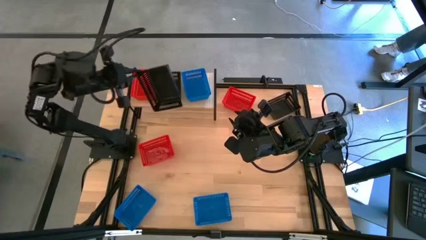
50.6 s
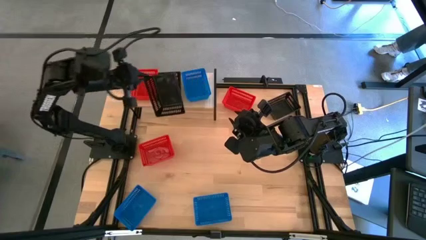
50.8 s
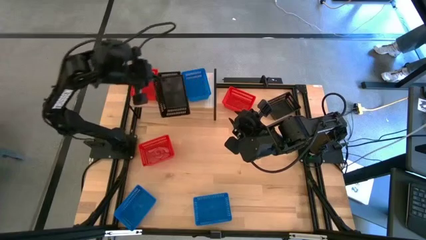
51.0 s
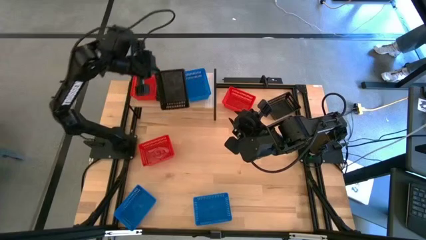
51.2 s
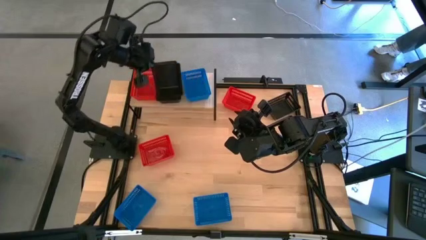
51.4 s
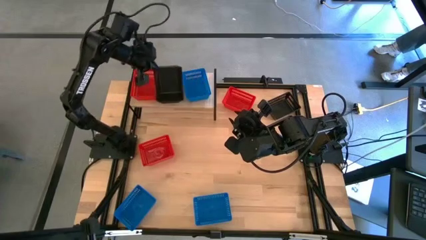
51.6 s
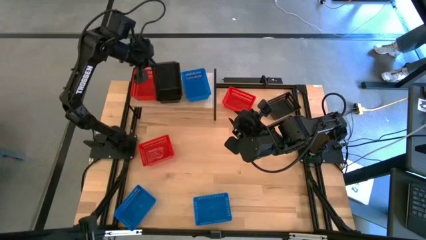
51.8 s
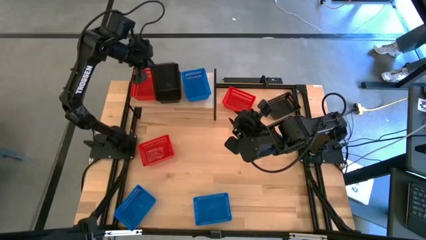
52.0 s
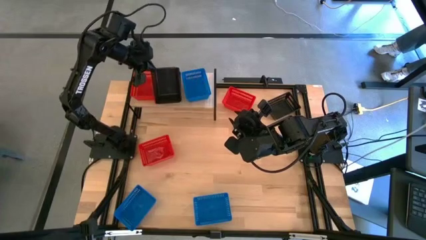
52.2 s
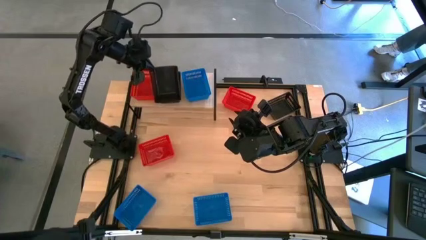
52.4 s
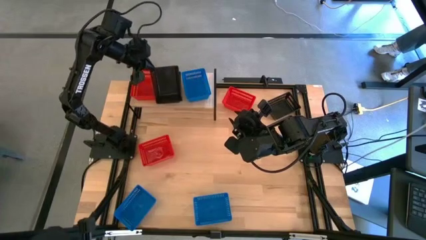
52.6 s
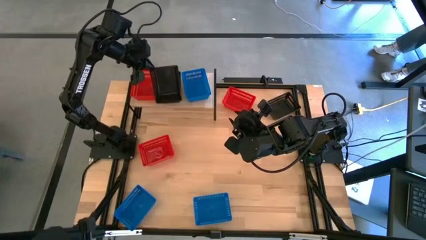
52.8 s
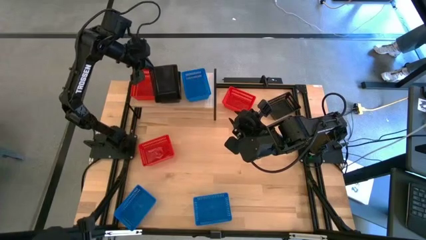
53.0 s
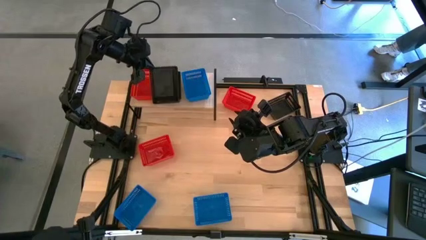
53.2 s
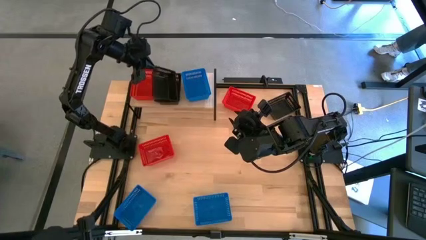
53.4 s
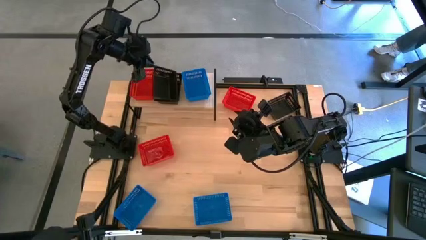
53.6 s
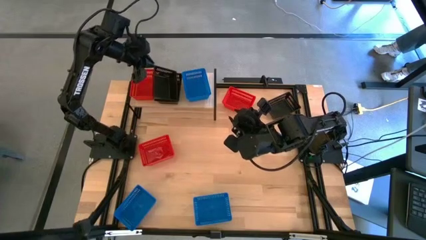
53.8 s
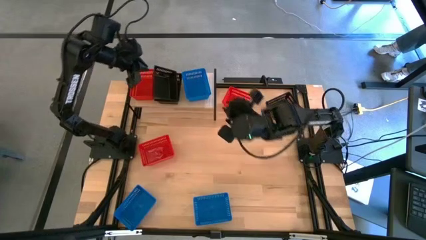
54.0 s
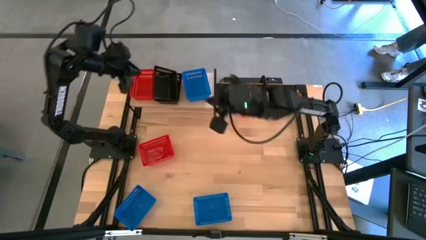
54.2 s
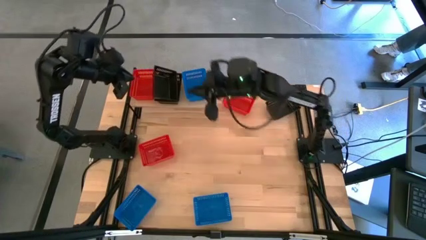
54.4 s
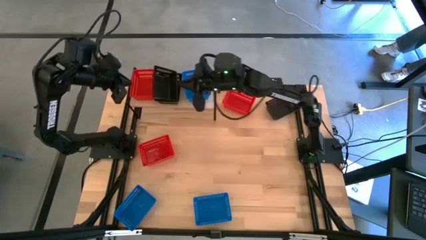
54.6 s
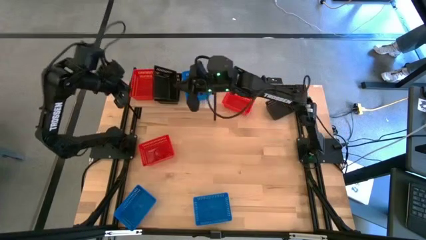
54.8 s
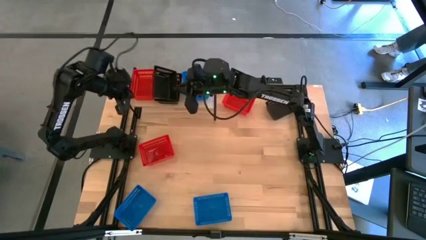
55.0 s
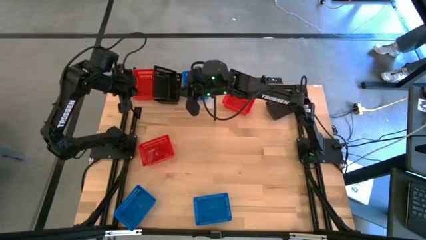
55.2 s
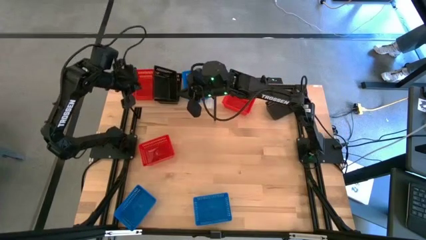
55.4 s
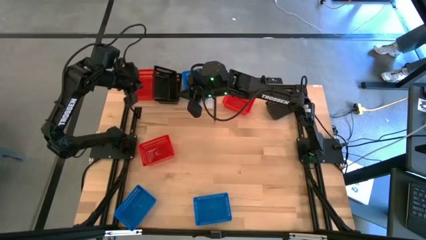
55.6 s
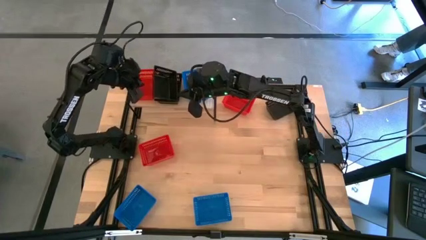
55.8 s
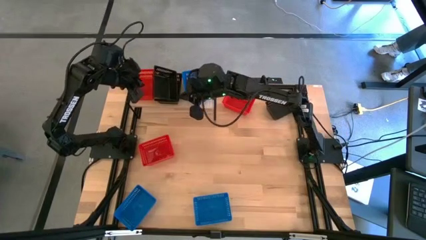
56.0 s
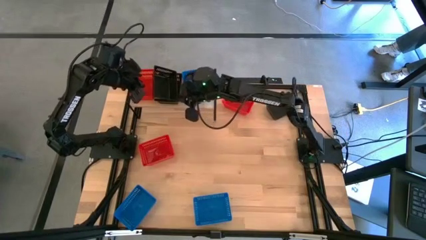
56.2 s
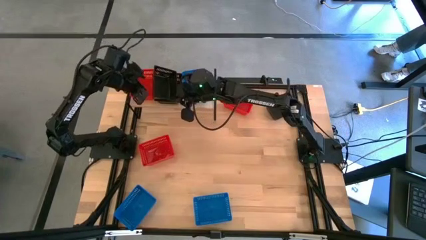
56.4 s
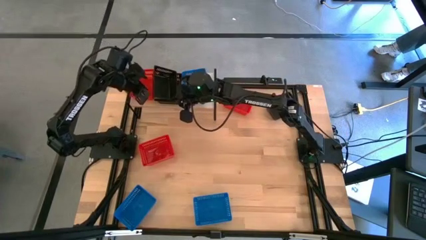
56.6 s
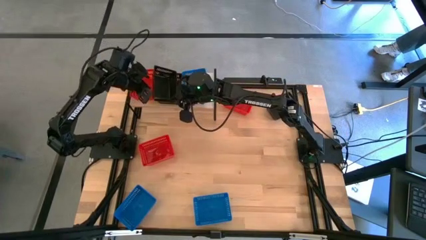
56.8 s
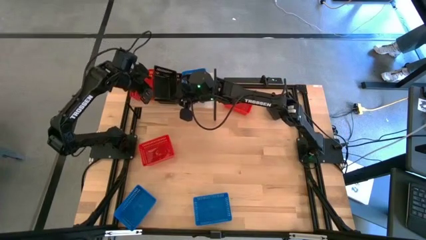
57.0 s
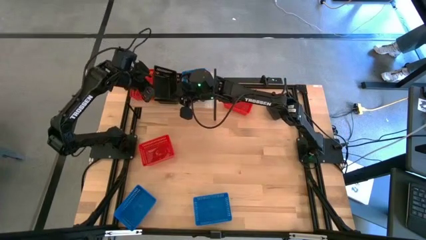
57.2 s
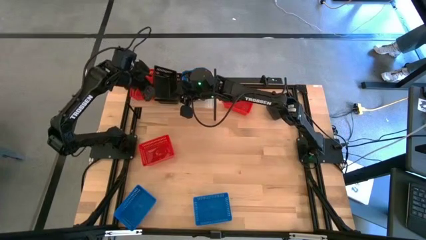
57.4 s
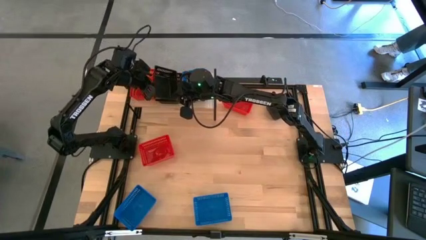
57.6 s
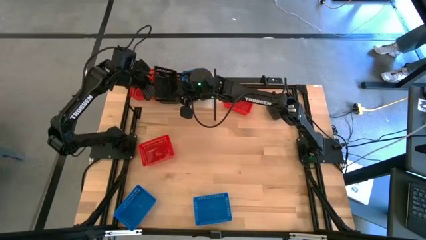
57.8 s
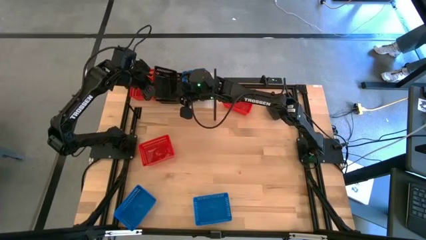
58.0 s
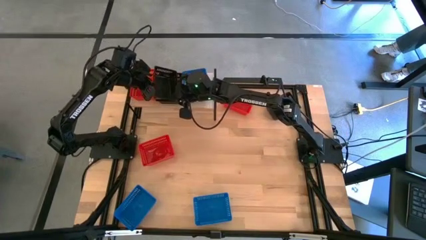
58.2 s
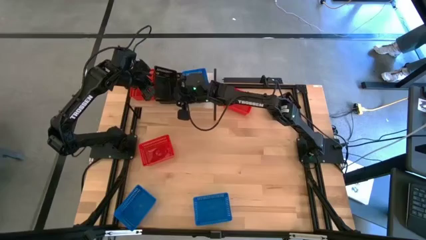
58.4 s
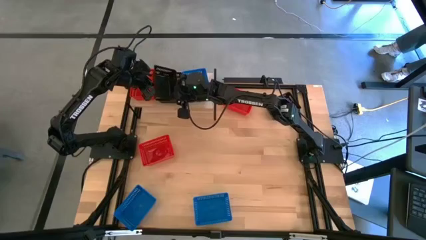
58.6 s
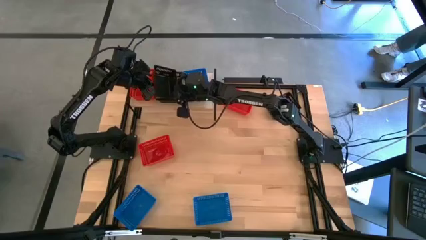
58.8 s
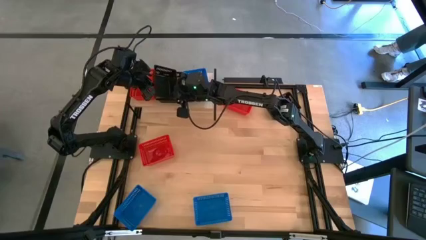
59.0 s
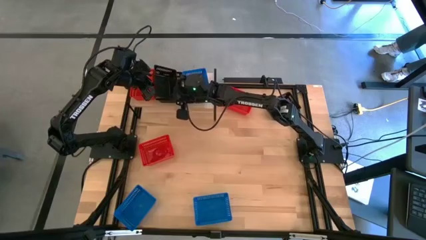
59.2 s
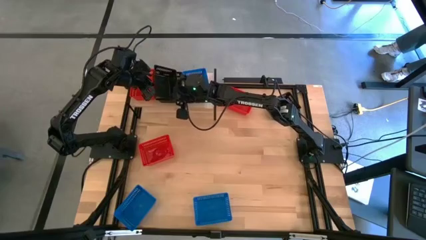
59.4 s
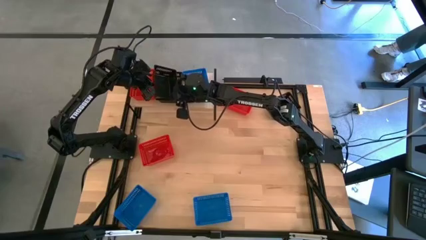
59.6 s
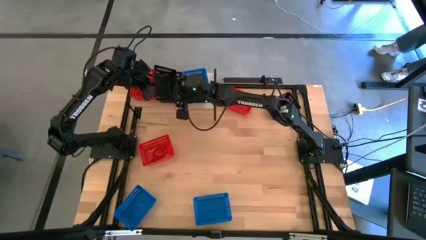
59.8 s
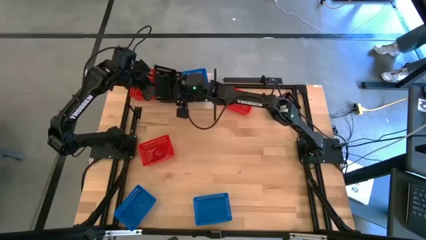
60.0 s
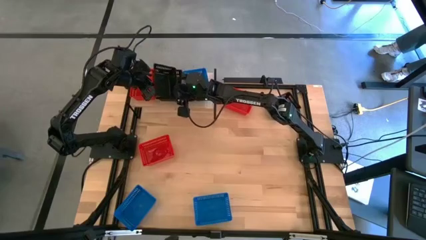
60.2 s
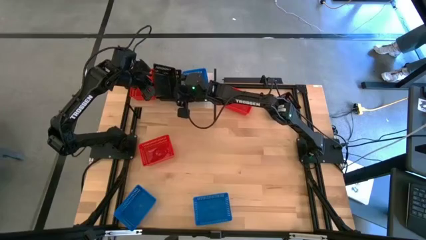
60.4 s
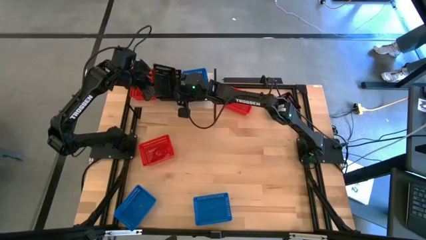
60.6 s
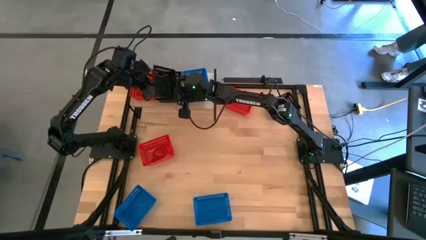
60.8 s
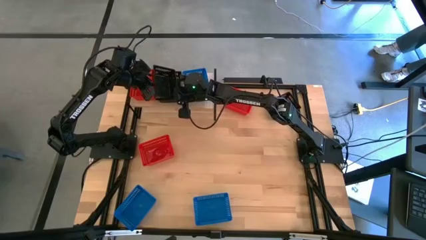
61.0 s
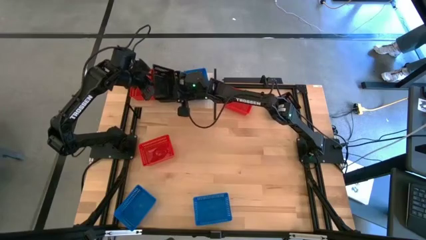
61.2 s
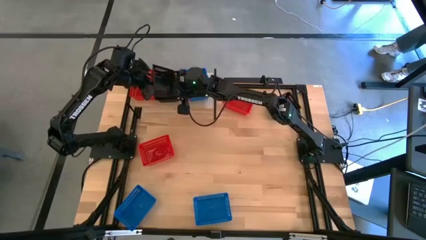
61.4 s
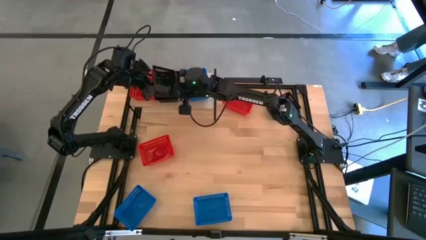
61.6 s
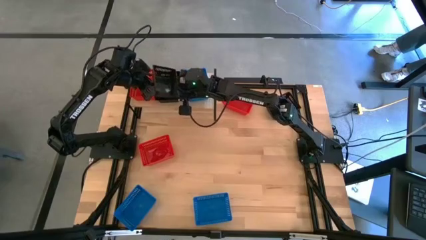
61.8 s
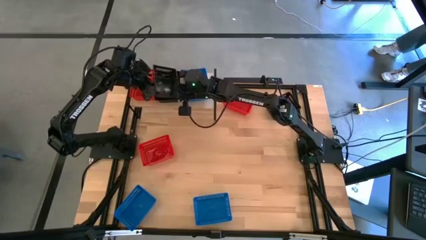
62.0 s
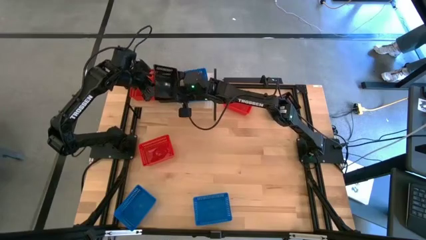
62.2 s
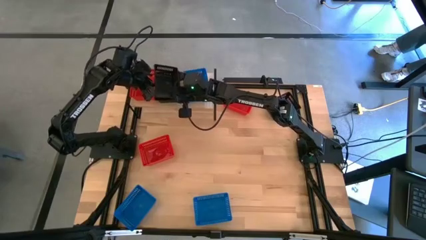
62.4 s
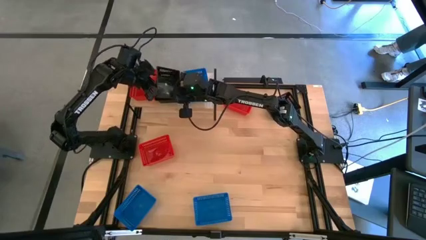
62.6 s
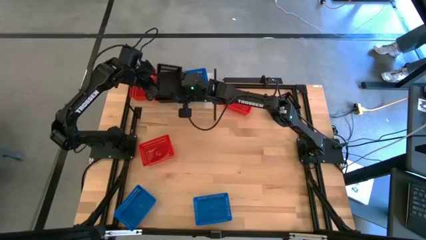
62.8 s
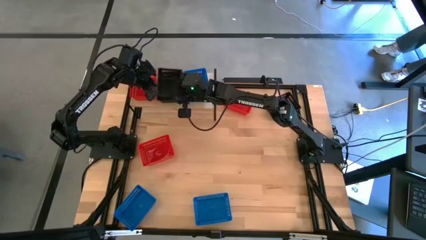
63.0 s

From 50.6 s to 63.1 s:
Task: Stack baskets on shelf by color
Stack the bottom black bin on the other black bin on the shelf
